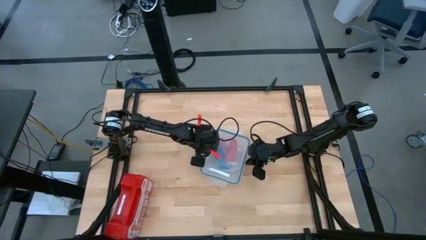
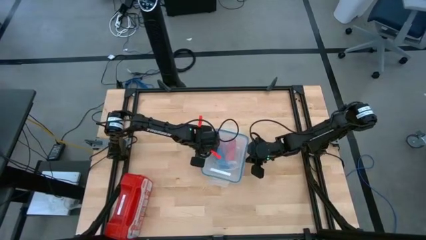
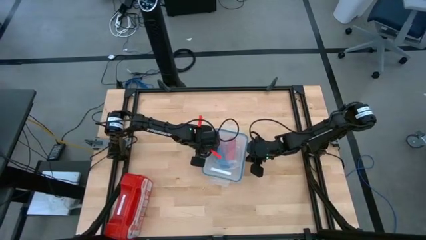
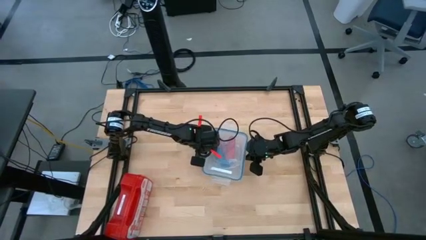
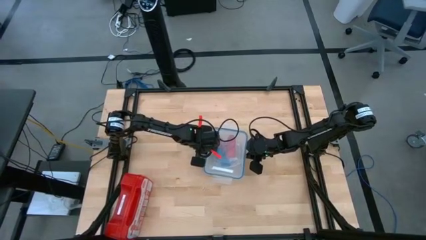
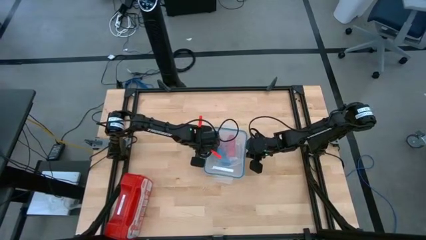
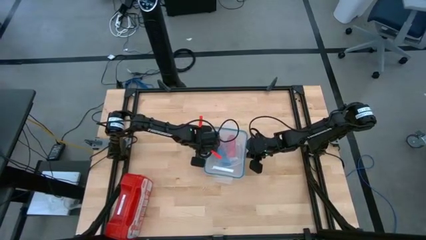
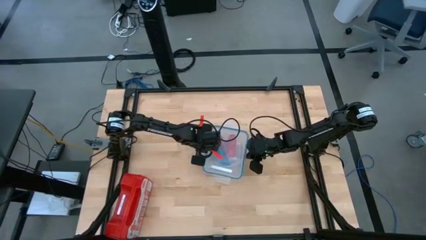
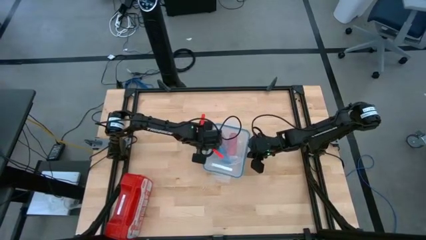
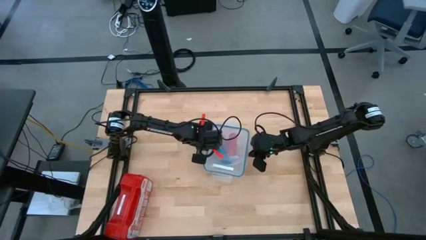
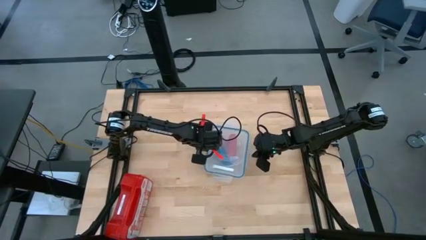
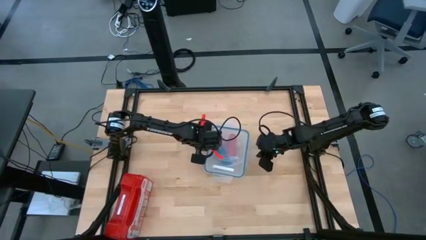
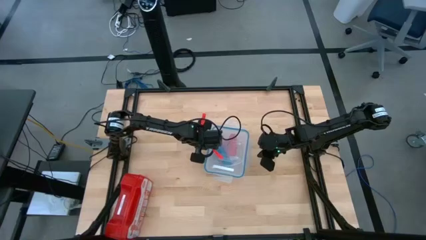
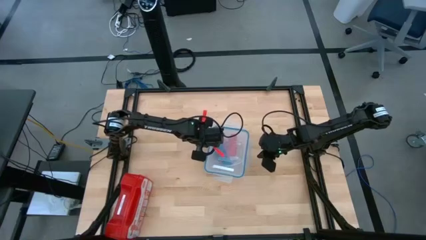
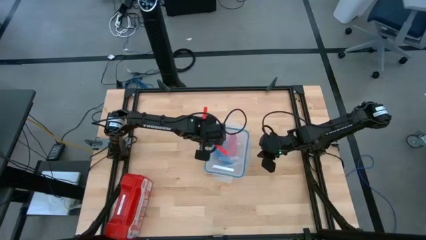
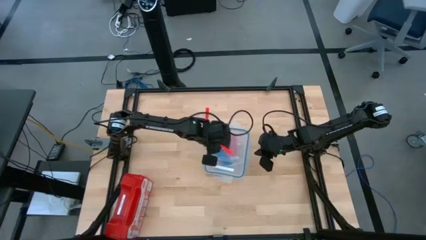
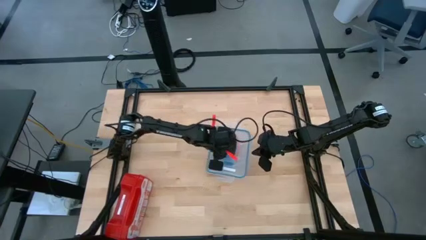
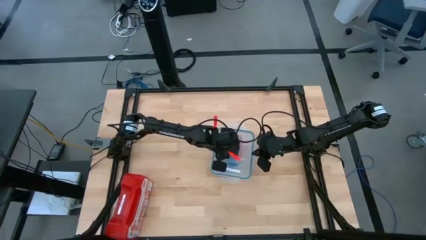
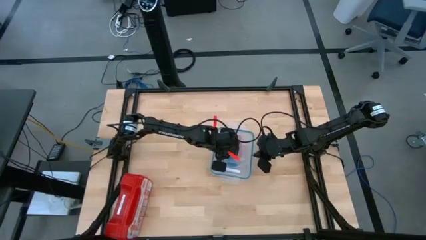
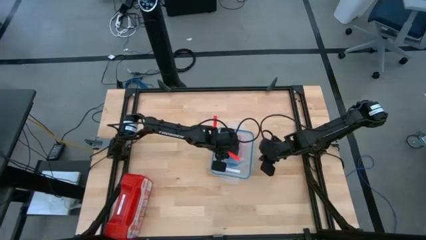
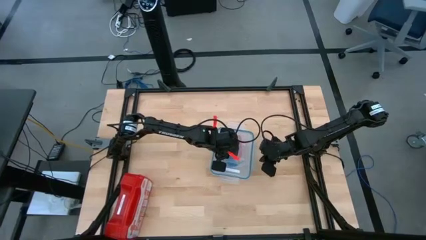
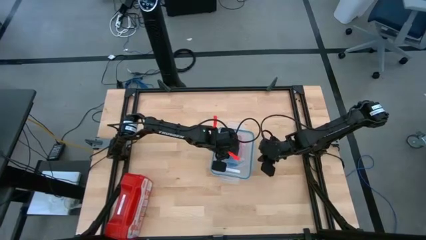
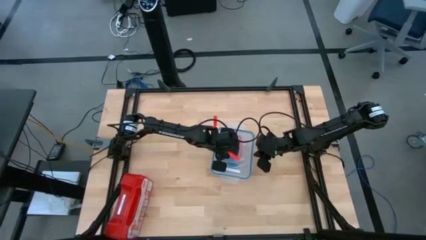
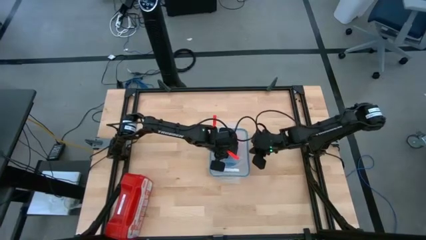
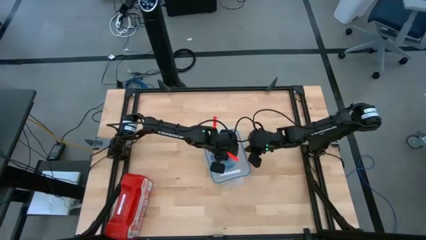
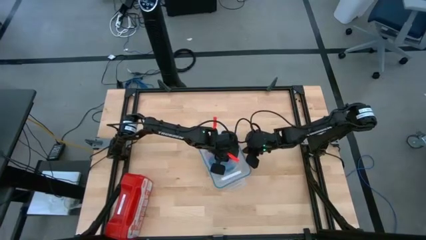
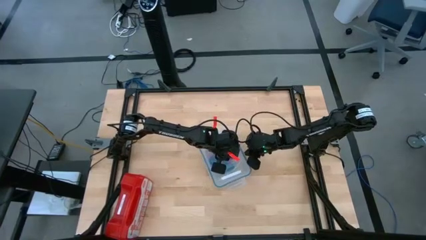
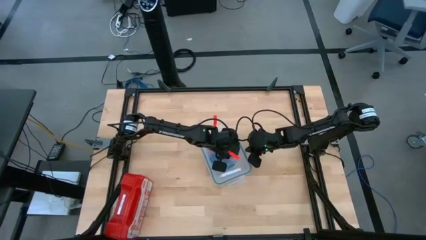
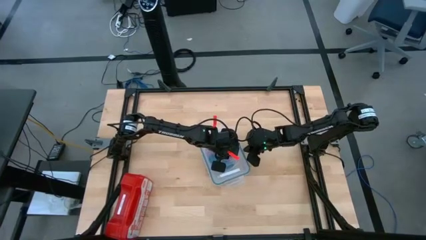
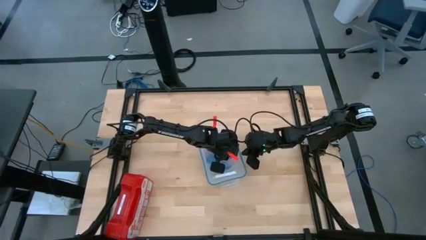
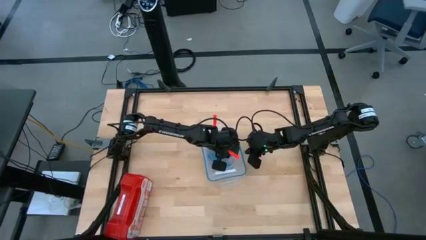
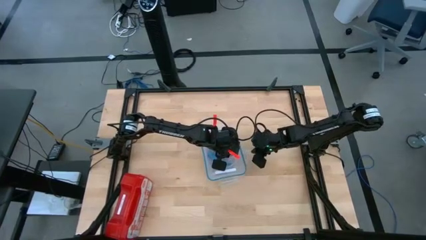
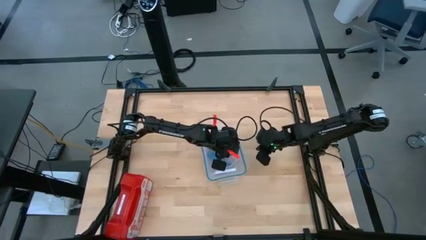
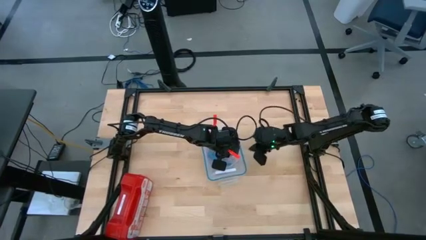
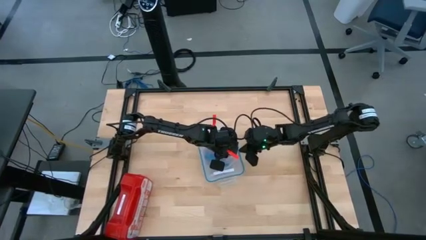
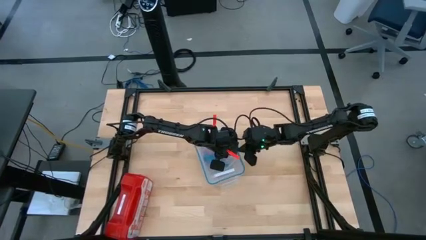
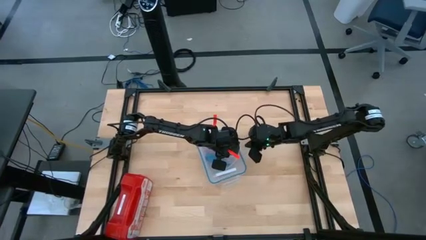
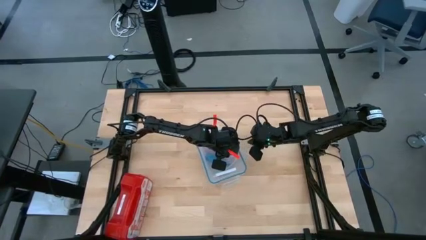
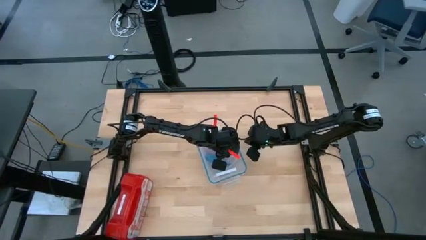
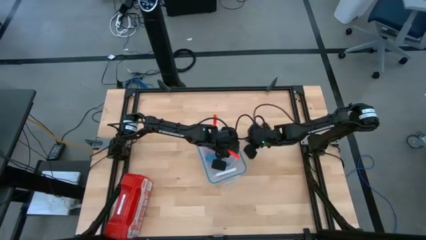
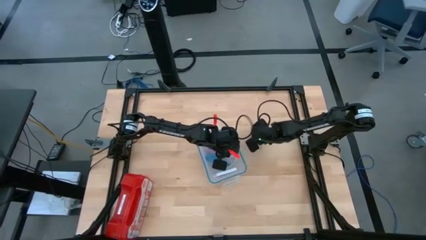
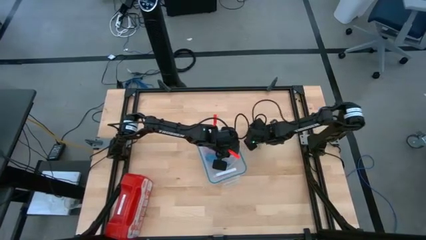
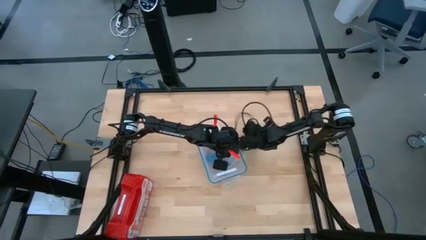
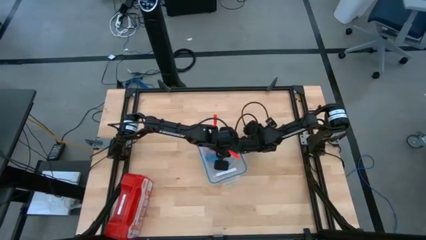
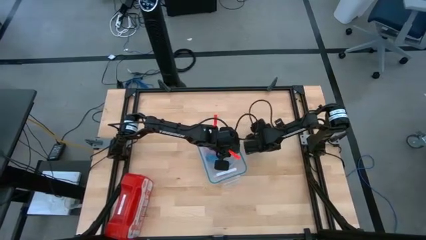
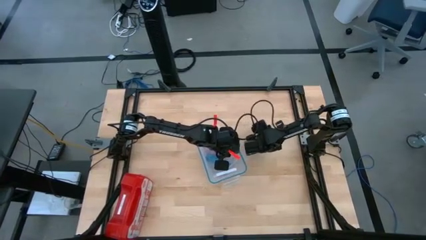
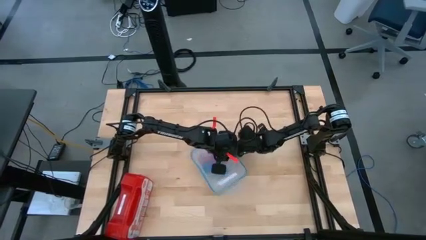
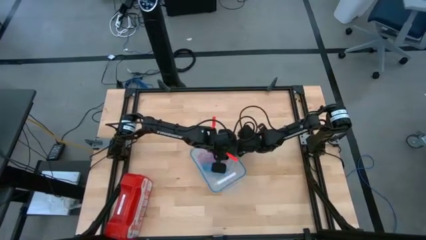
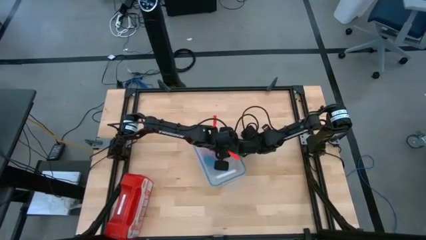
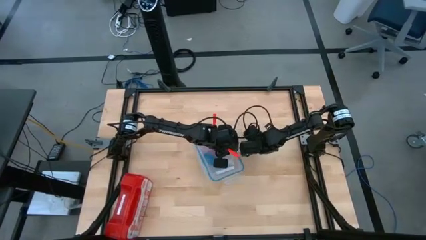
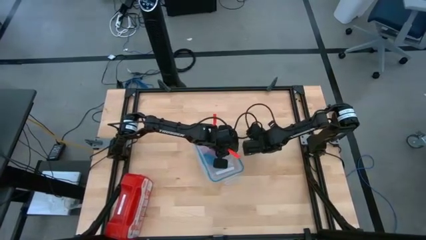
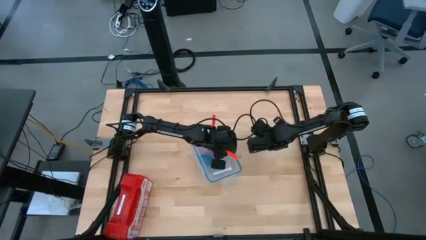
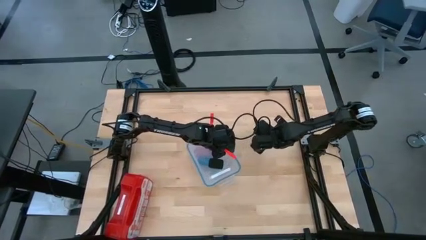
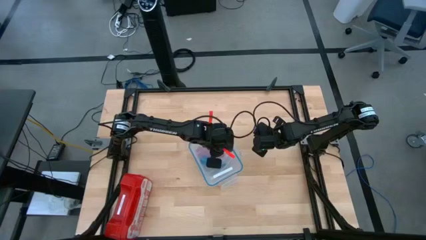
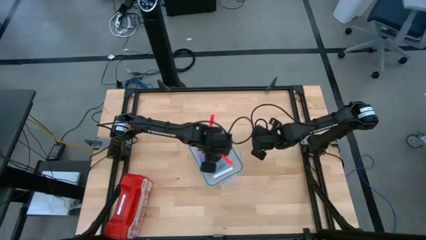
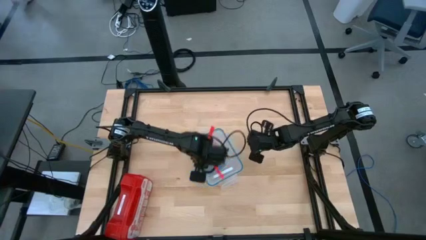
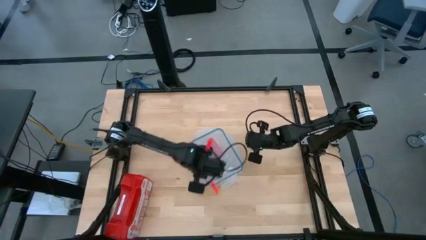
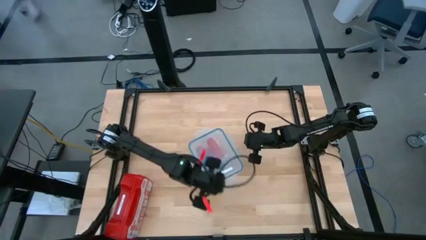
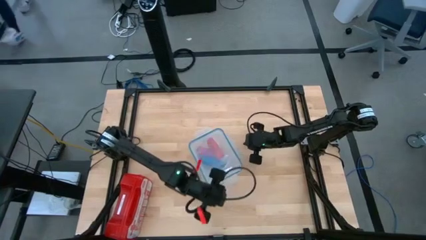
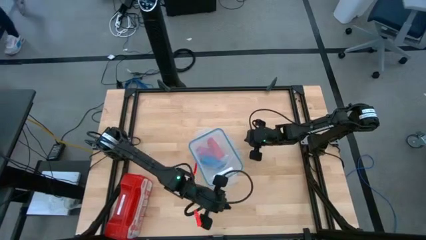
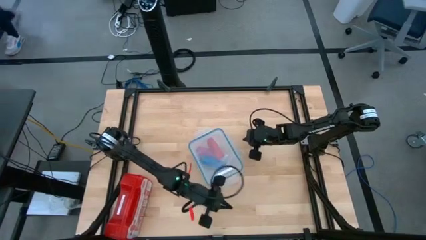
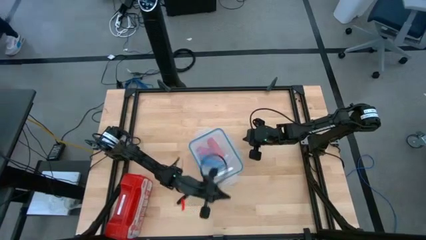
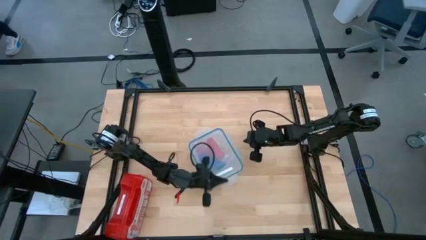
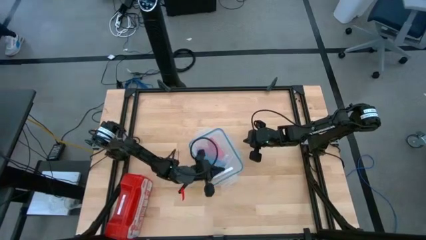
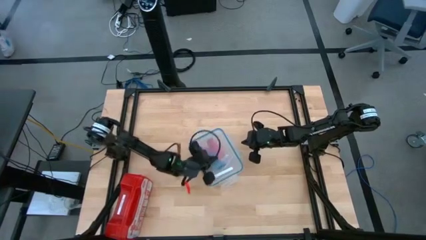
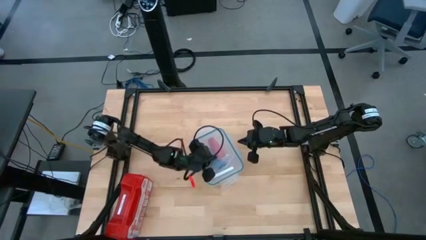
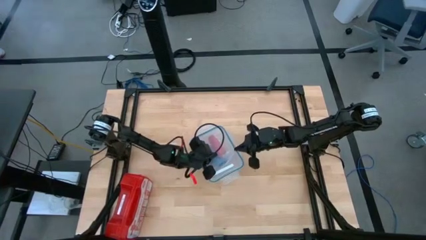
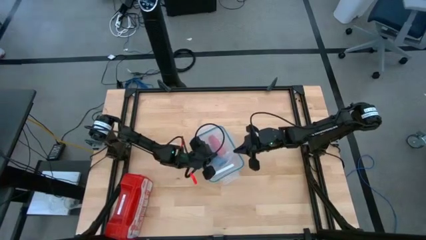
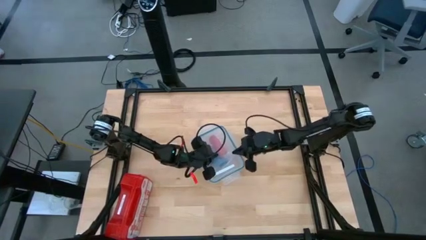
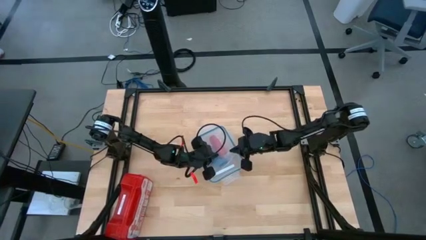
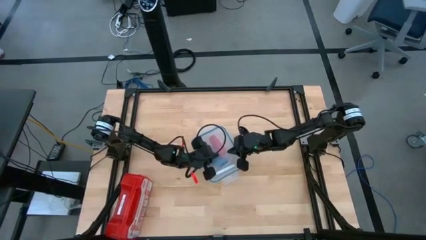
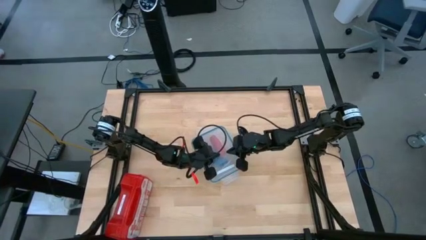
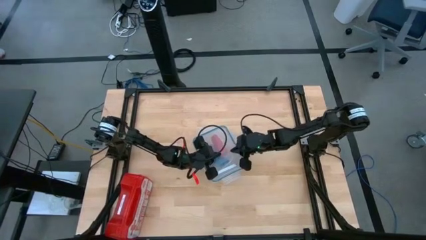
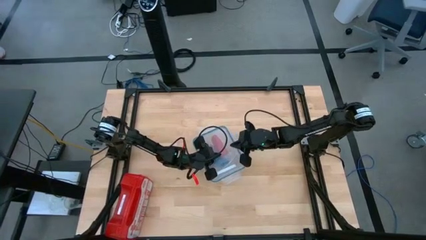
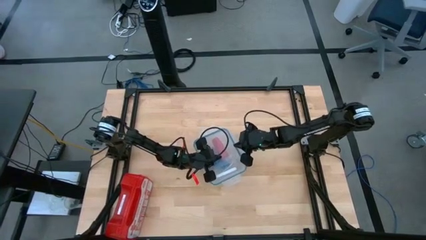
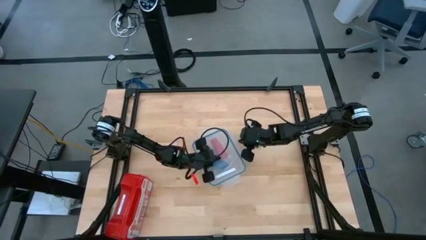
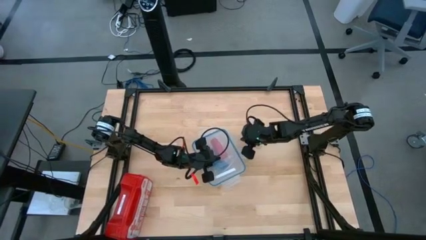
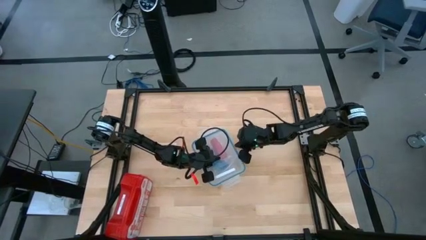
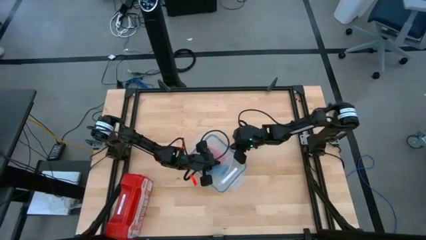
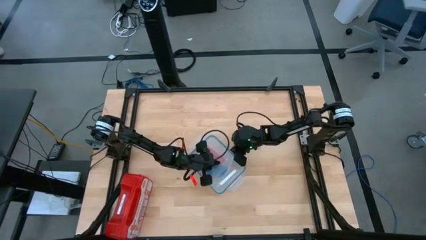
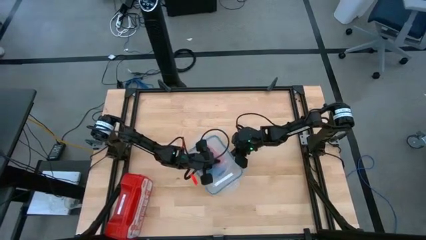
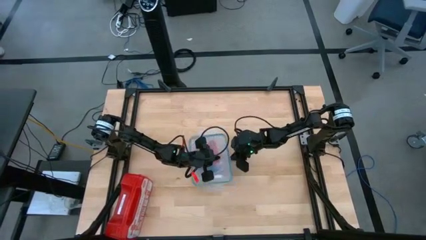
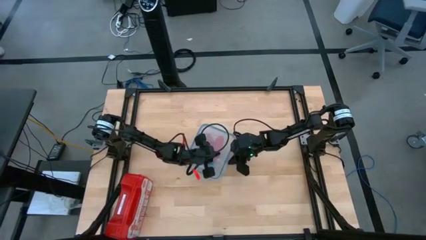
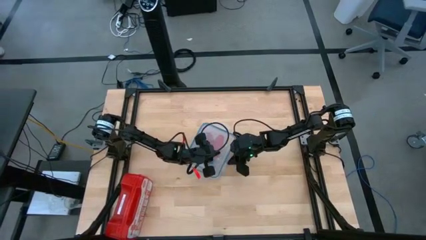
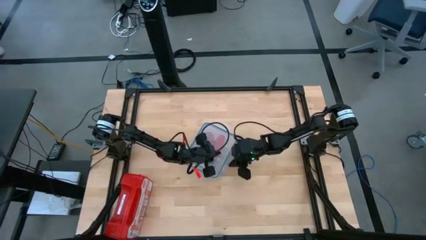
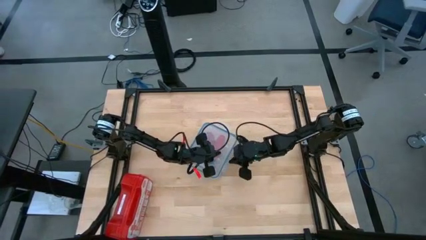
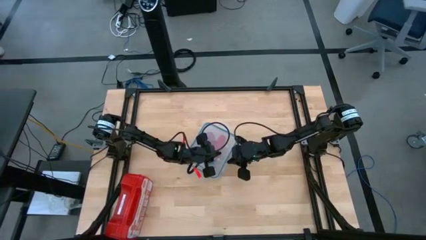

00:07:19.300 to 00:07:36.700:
Task: Roll bandage
Close the transparent container
